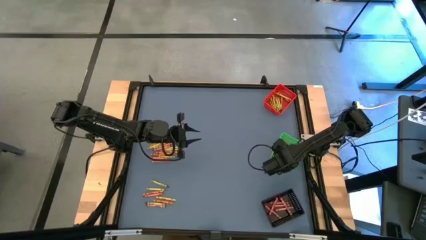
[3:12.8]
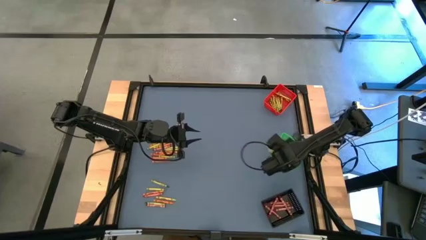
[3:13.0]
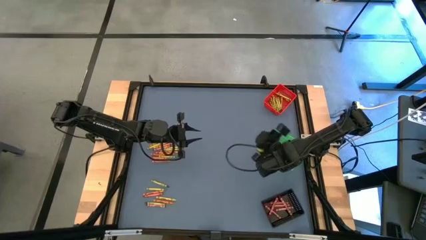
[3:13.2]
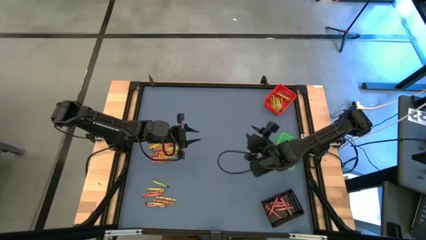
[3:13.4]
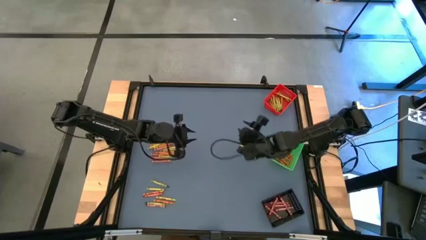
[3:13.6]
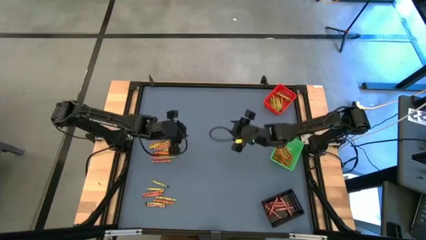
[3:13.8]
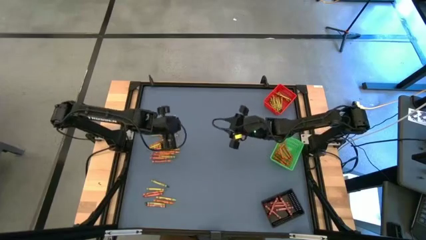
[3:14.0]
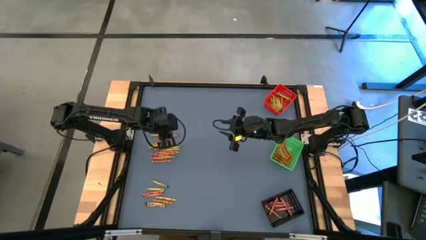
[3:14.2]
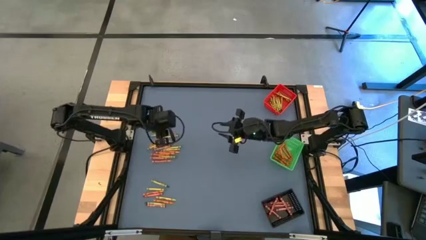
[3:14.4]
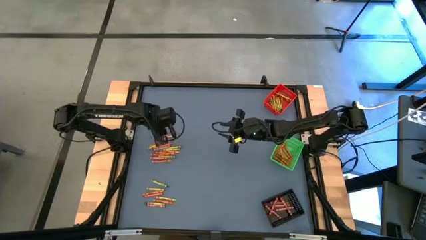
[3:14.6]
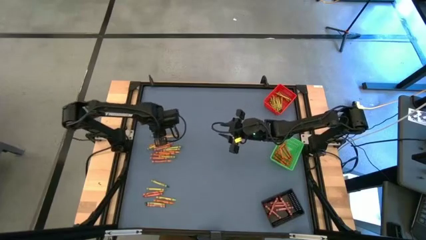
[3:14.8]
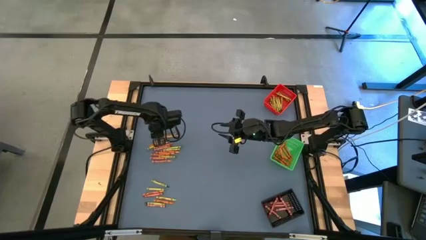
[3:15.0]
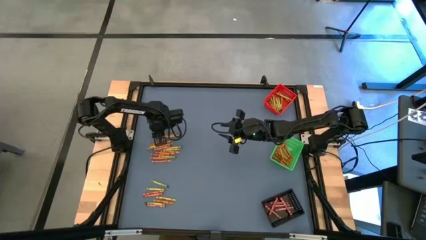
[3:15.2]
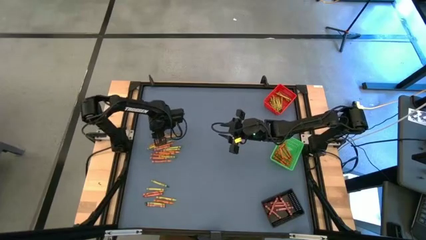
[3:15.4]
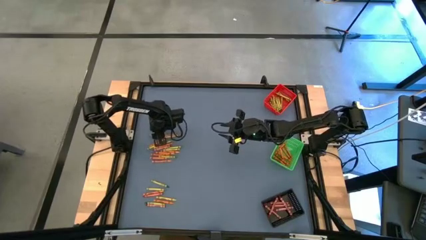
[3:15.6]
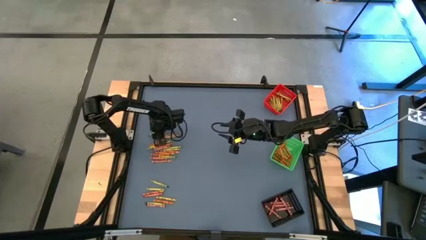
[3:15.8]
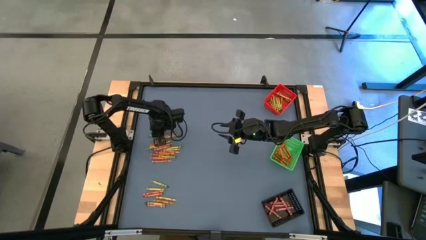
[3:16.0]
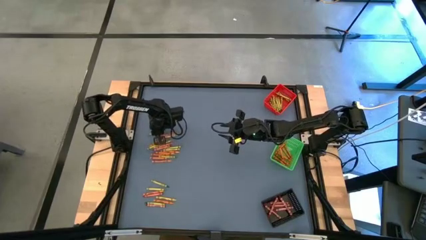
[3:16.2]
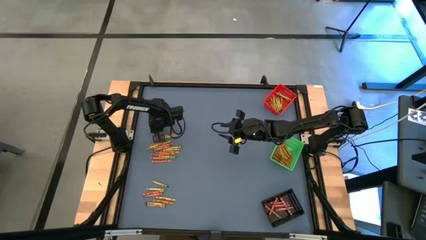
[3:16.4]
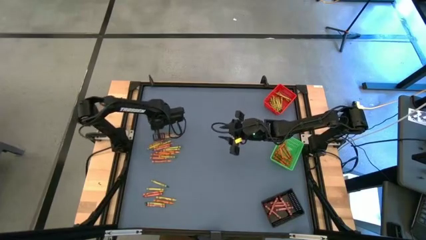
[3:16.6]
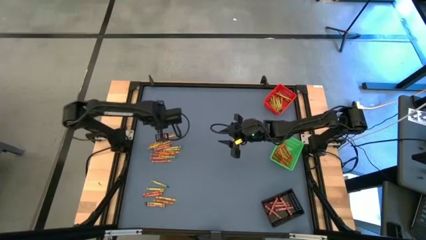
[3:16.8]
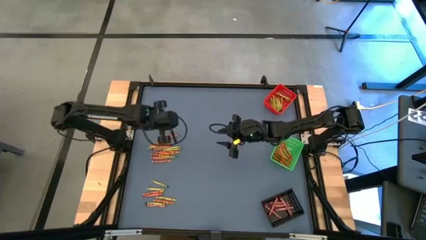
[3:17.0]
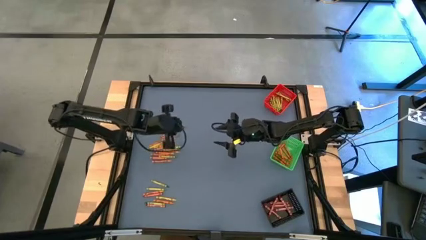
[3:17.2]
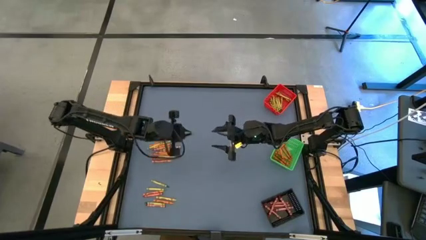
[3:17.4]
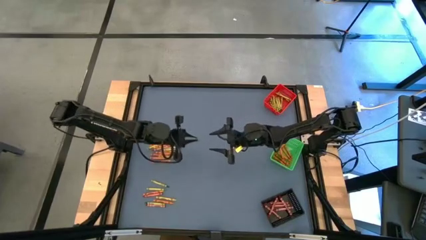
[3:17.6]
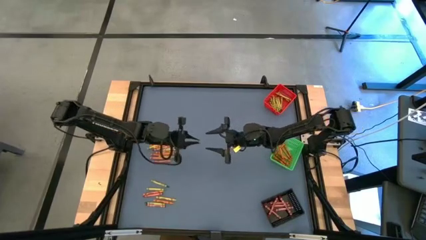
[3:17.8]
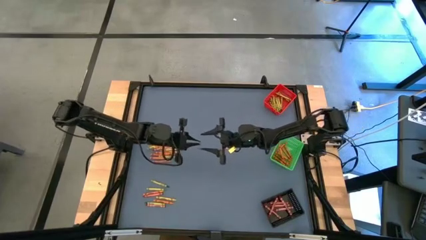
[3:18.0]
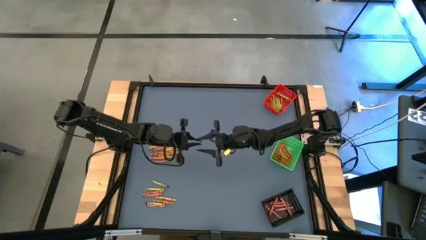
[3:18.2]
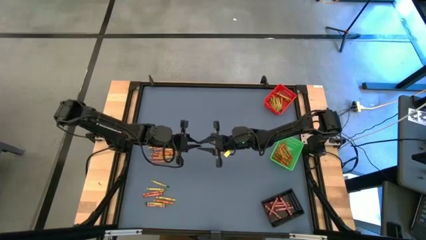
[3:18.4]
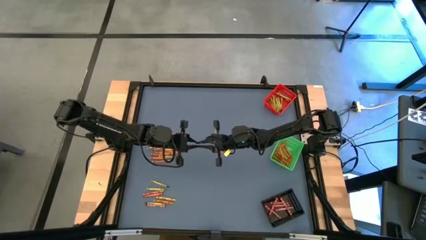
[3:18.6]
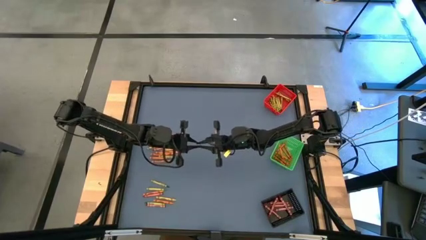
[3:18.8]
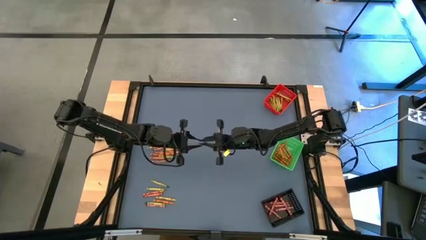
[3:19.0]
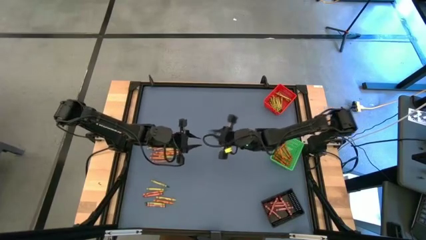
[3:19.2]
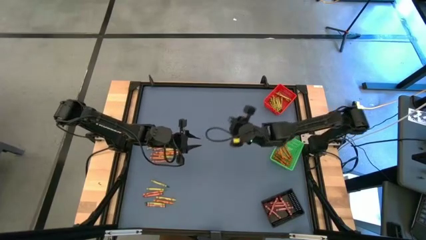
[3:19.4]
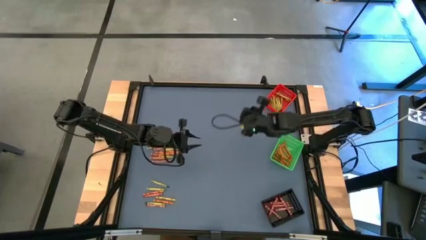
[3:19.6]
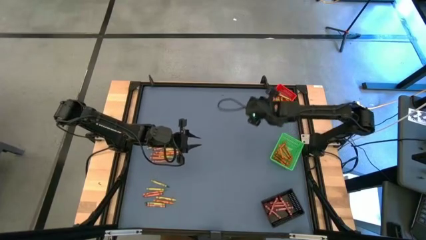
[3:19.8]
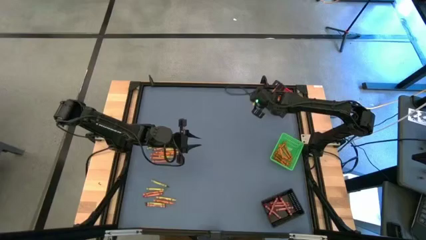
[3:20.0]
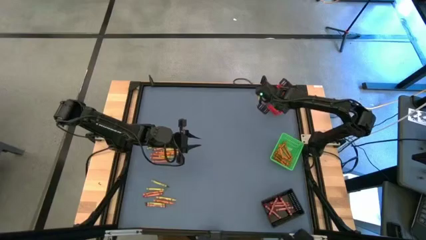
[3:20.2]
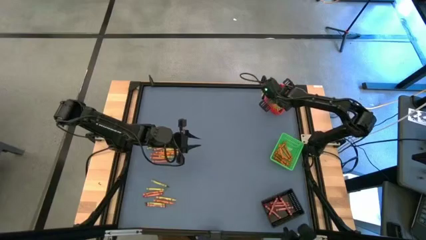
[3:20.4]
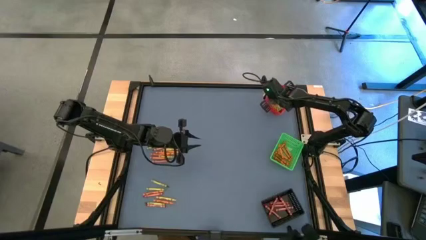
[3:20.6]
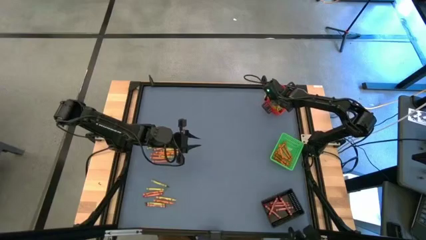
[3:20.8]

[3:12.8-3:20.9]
Task: Sort crayons
Put the green crayon into the red bin

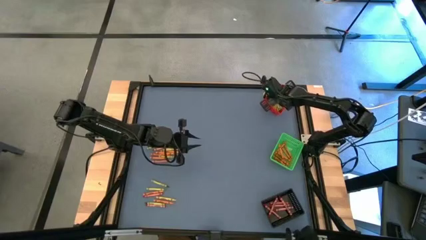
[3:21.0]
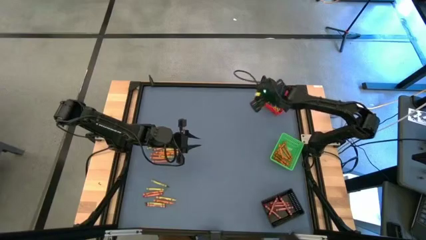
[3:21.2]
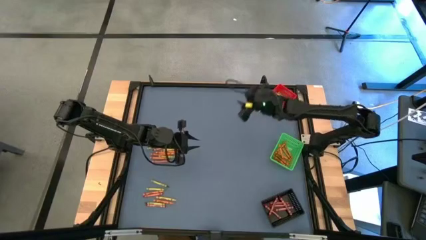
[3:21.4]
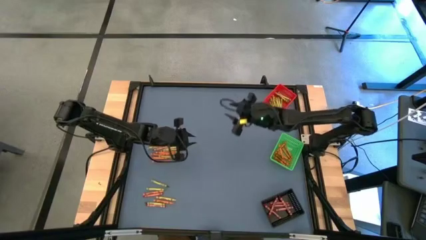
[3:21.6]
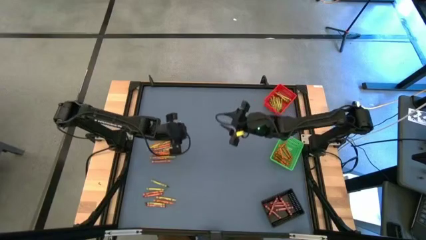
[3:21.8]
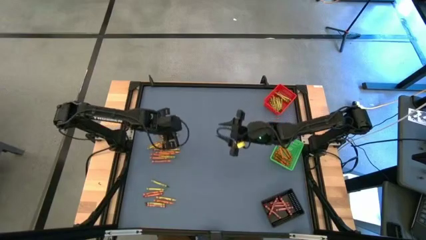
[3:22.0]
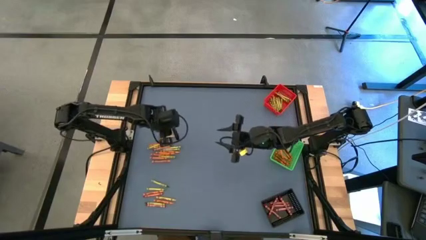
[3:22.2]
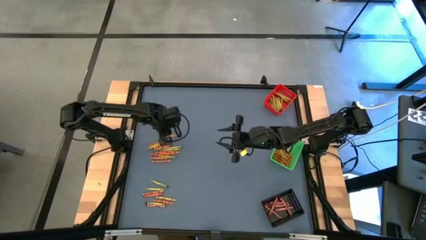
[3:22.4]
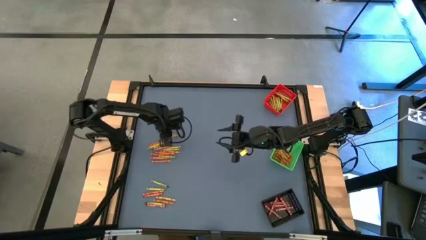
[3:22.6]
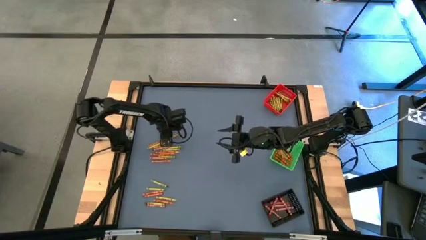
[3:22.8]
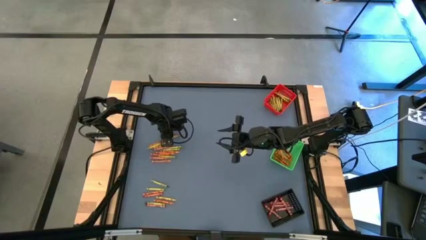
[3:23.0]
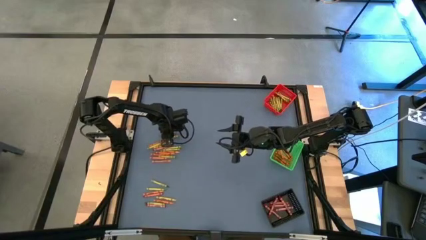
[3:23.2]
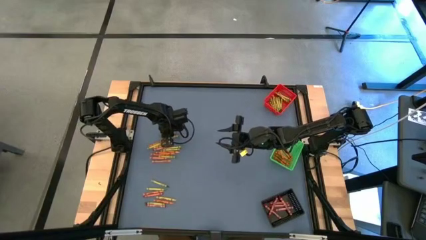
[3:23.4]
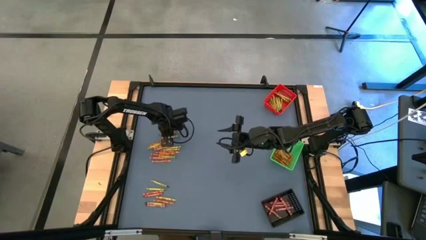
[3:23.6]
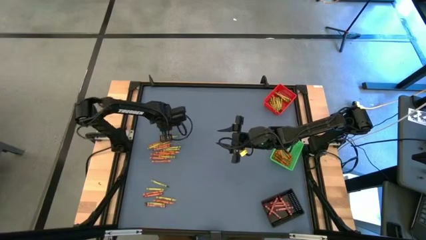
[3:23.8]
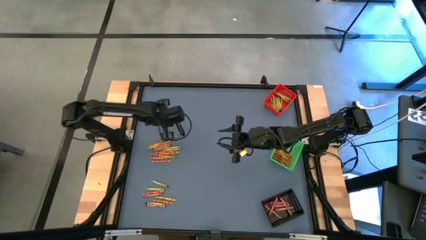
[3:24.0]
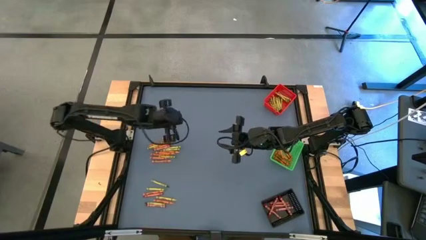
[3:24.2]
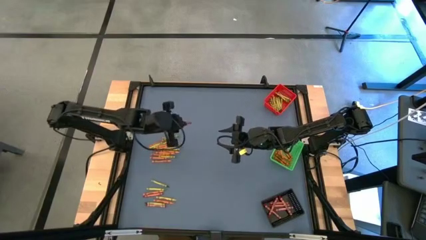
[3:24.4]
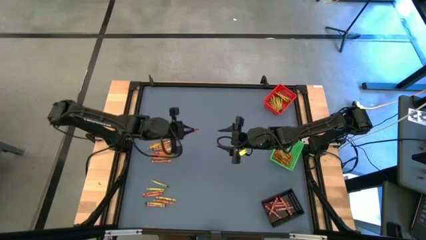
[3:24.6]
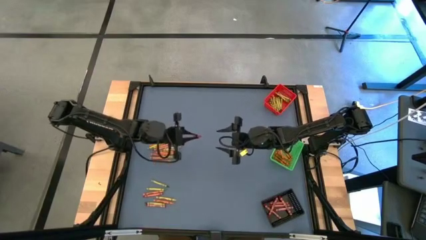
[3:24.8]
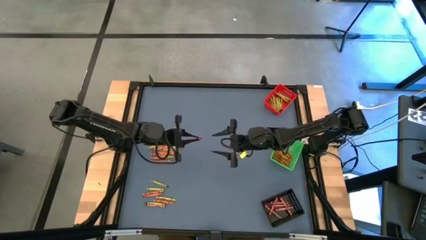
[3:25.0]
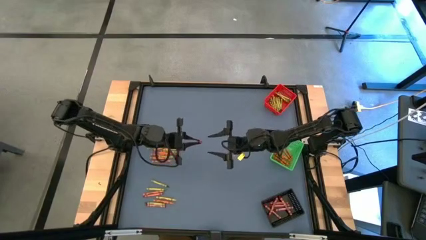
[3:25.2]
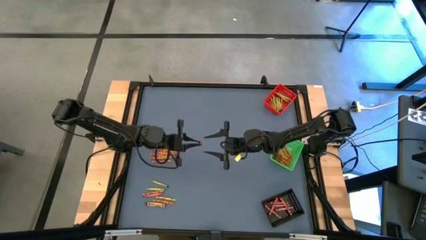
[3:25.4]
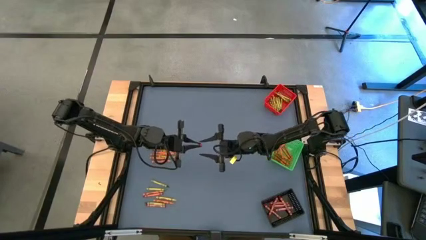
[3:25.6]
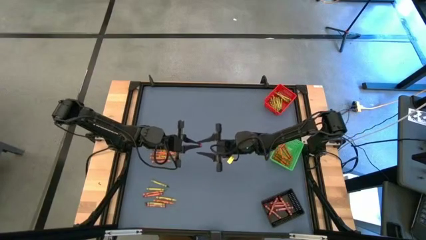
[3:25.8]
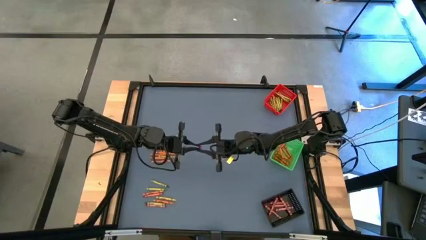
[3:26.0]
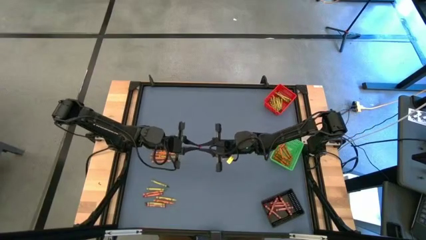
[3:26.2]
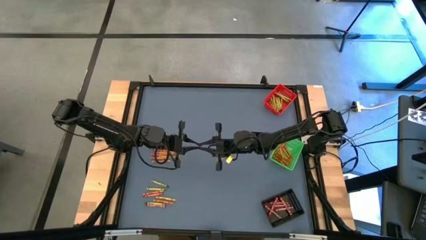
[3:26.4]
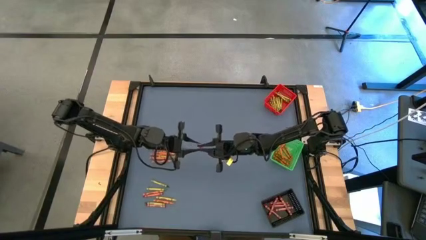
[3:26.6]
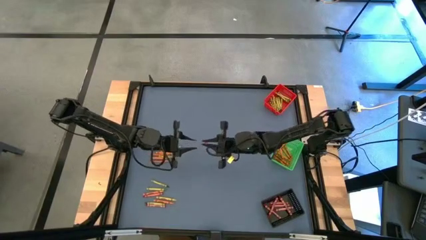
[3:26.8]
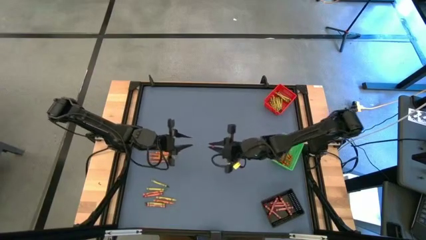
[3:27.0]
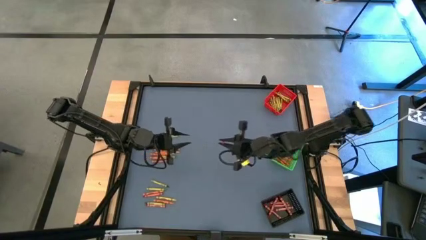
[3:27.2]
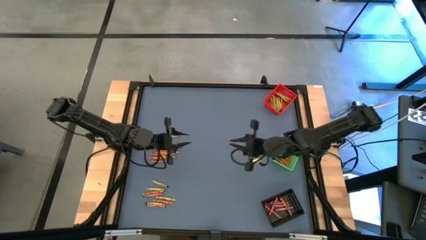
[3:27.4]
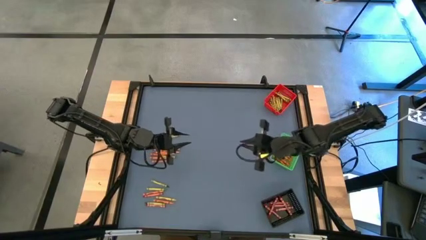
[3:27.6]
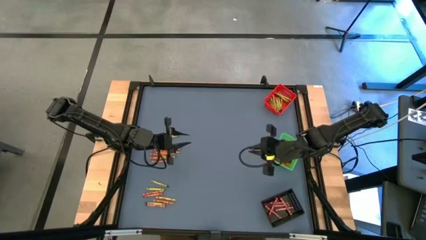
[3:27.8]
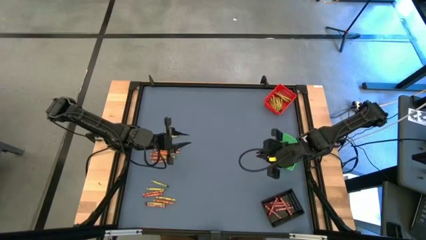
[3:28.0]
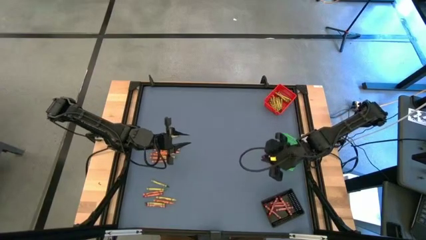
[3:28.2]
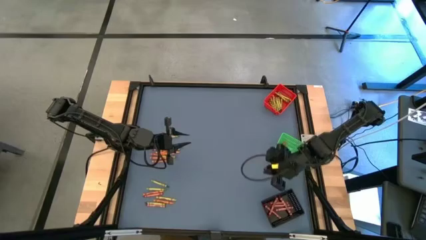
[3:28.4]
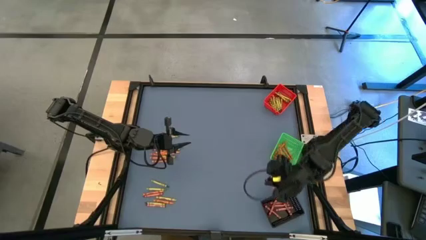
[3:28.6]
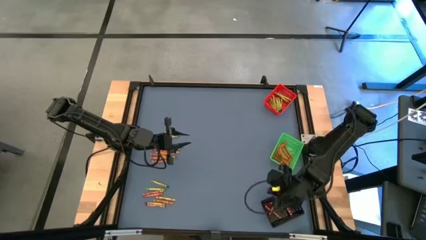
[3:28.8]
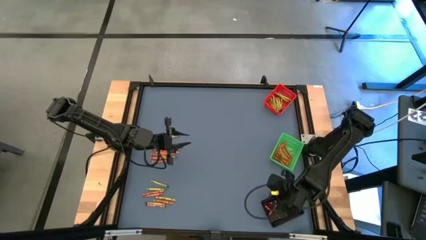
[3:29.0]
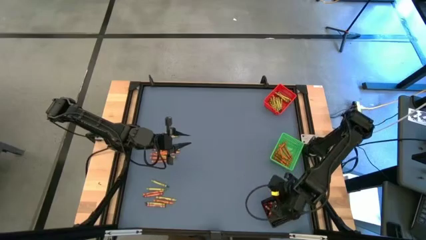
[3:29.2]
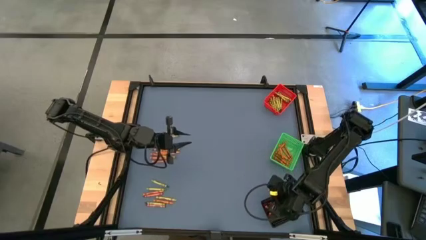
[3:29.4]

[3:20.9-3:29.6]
Put the red crayon into the black bin
